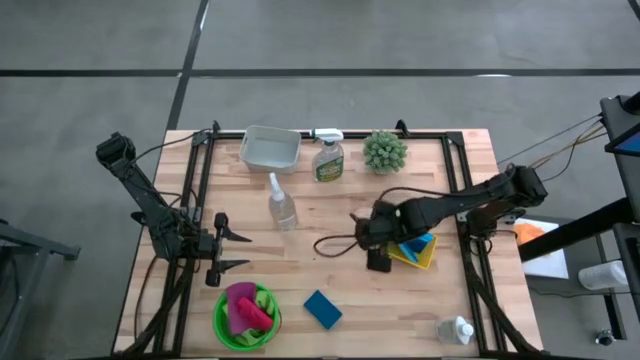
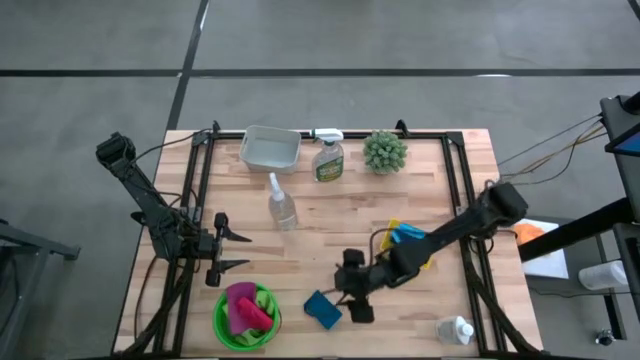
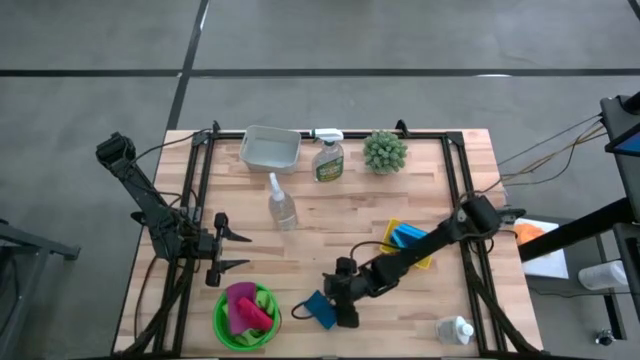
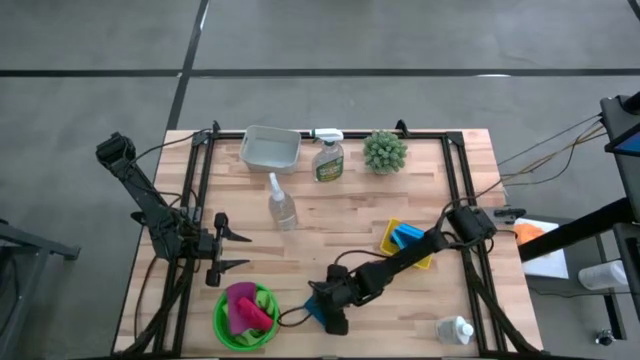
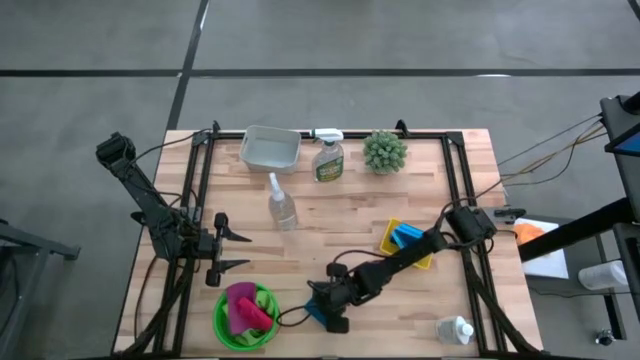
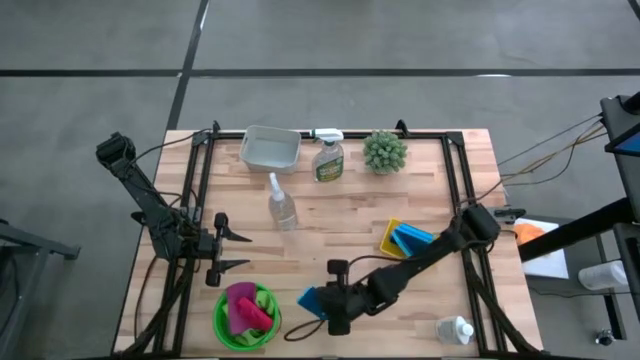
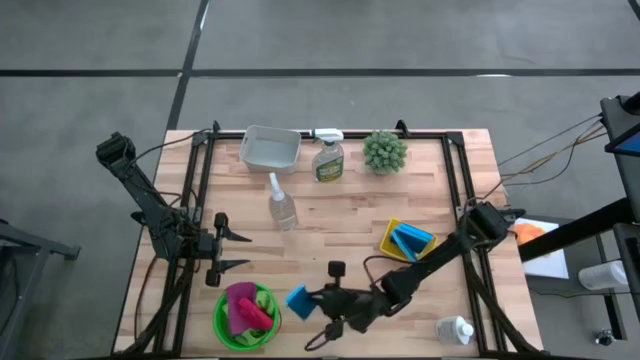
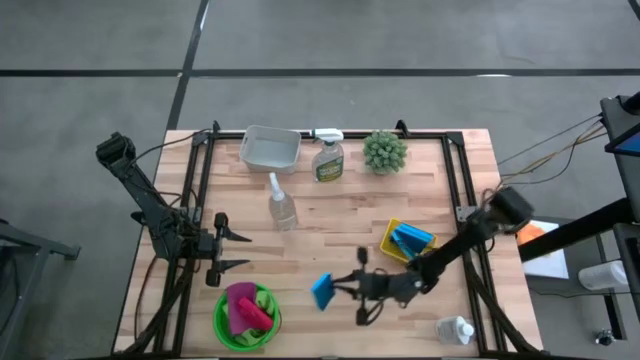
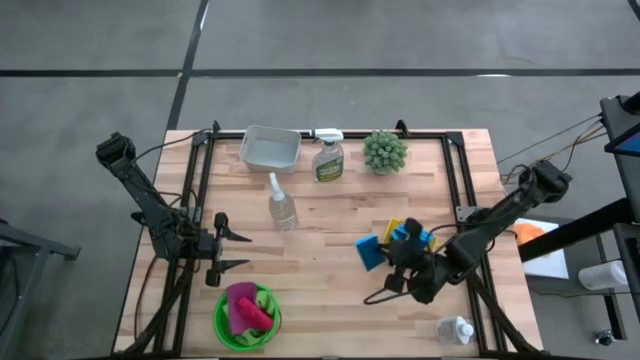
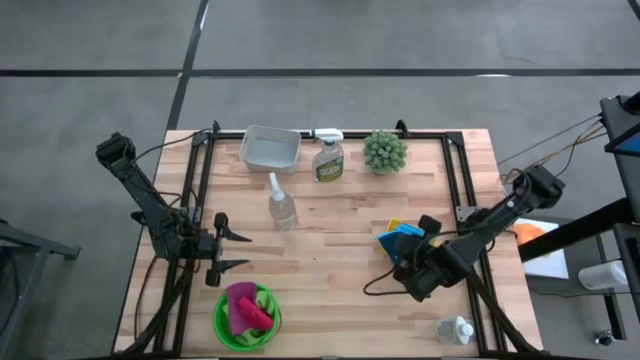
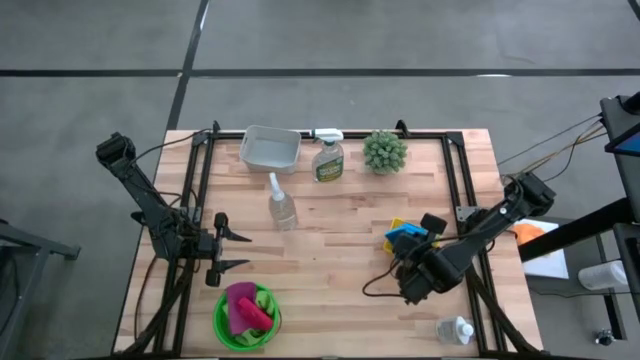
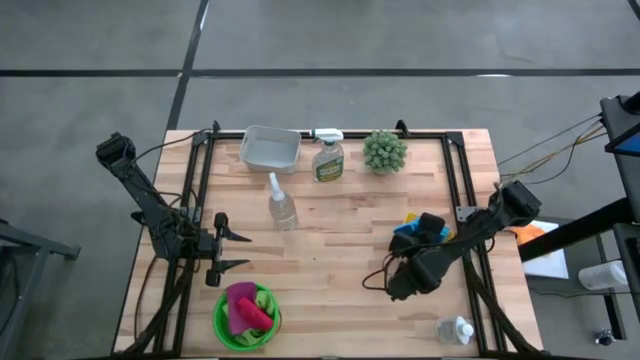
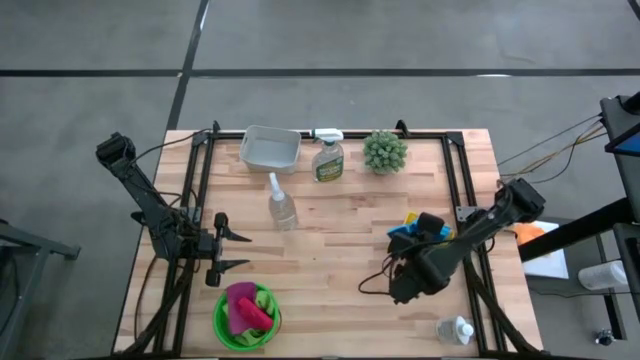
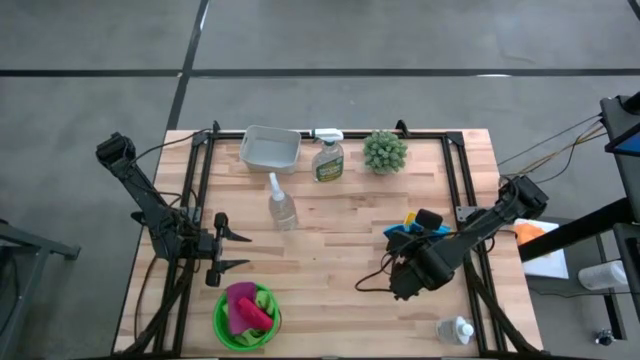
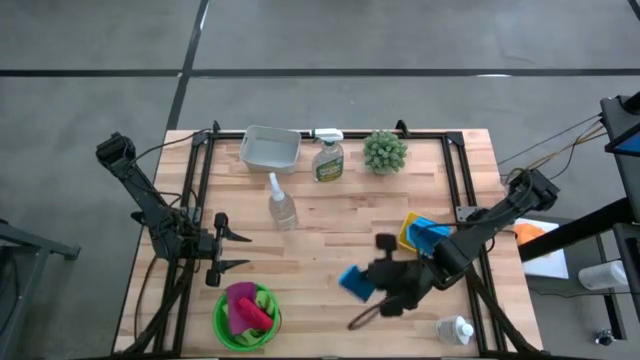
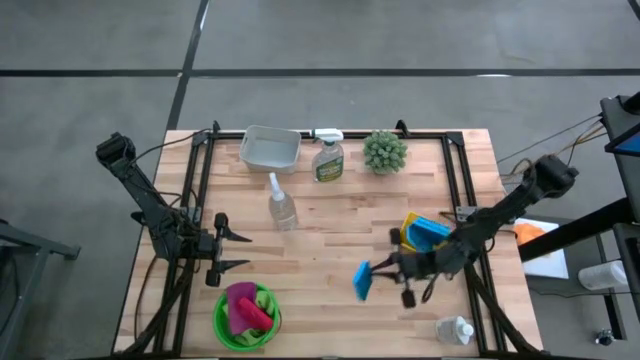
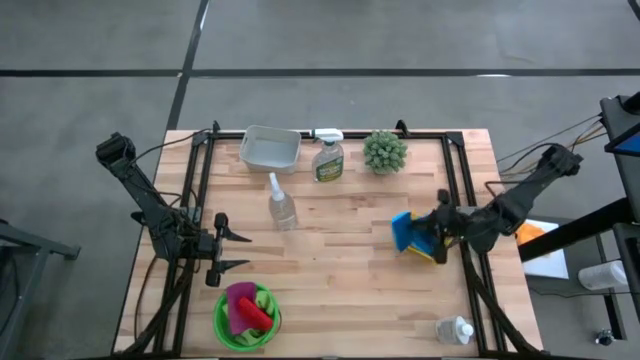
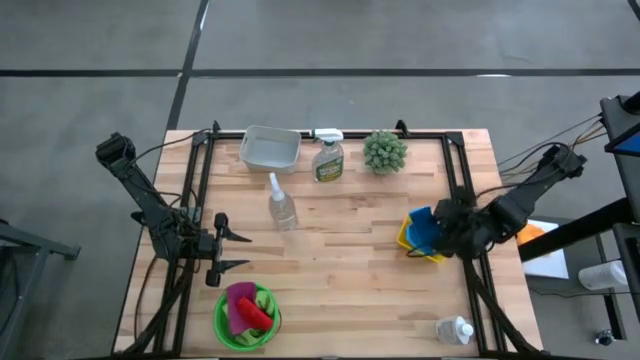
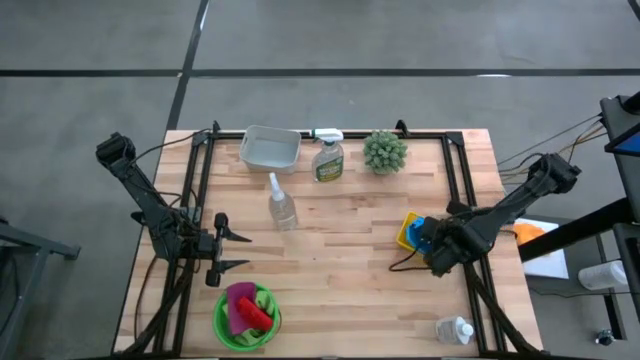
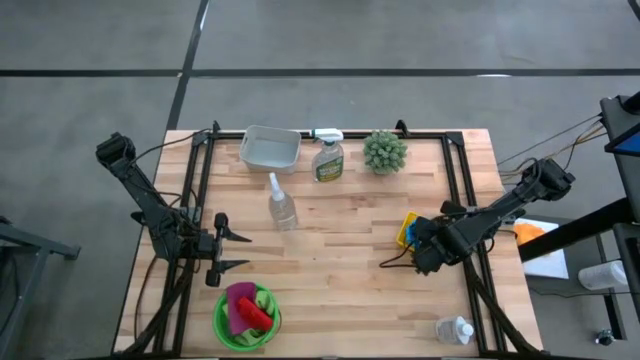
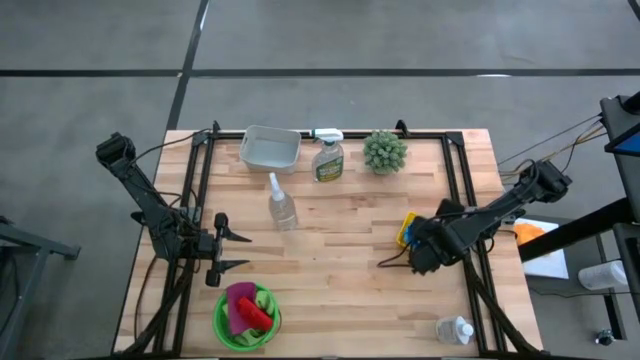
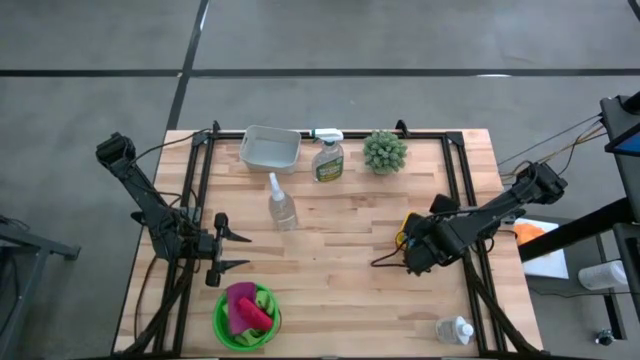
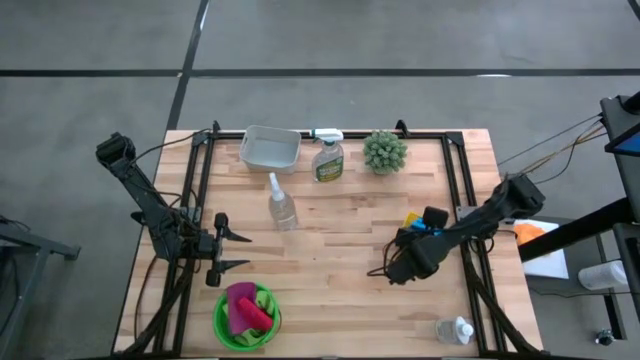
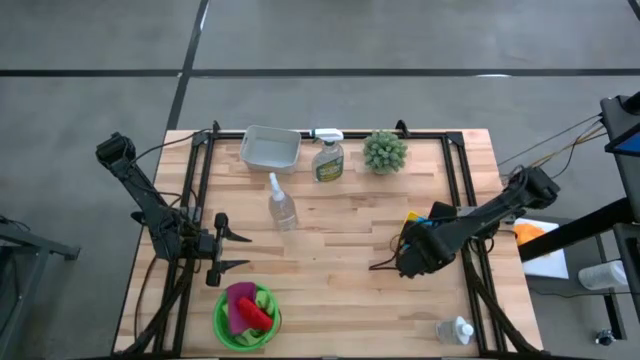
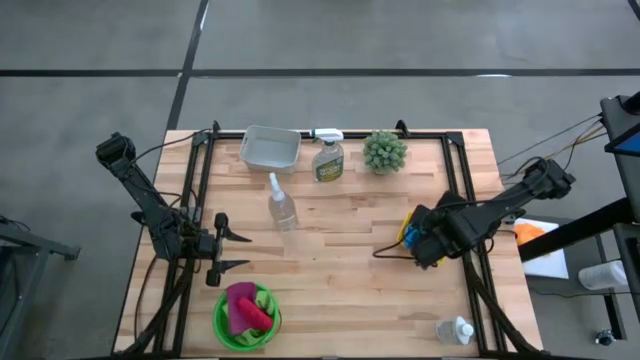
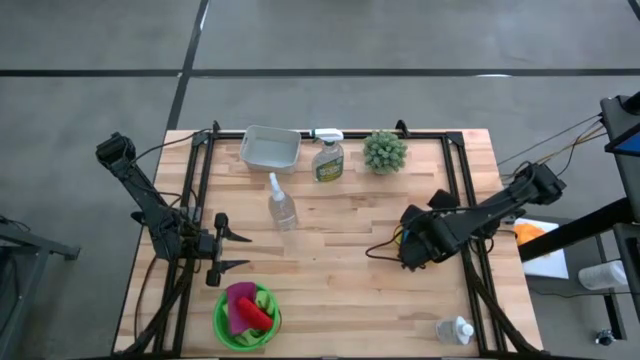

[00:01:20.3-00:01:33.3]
Task: Pick & Place Kitchen Items
Put the blue sponge into the yellow bin

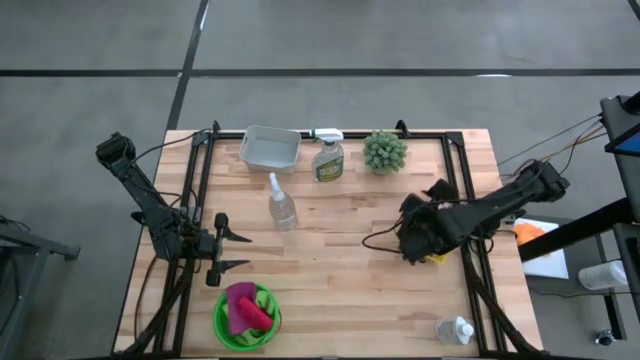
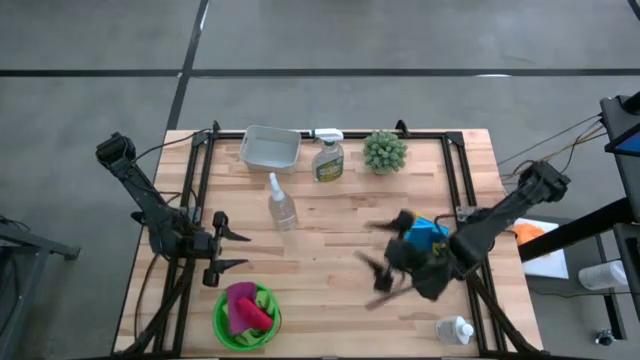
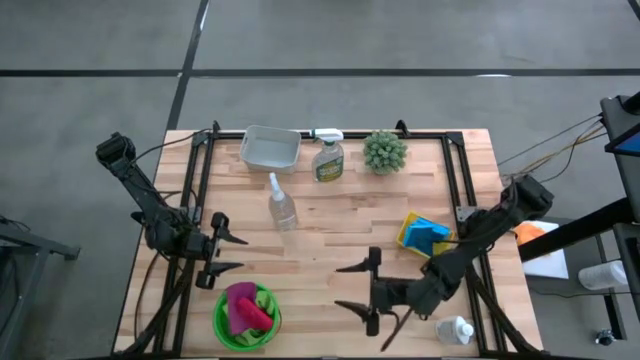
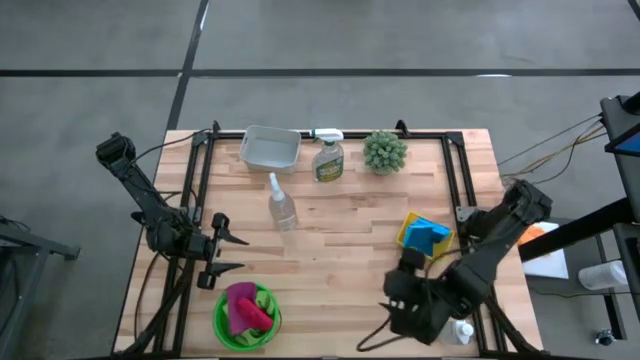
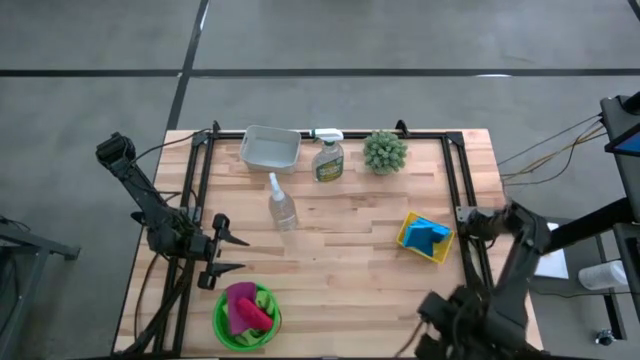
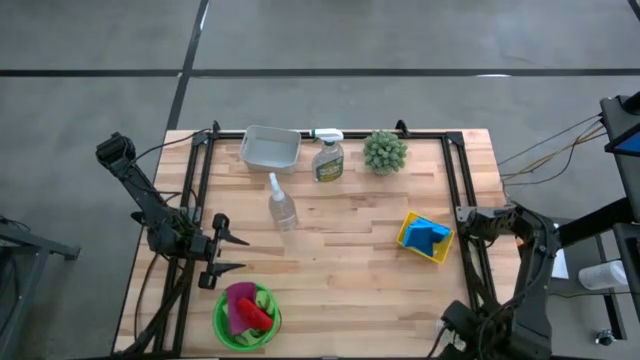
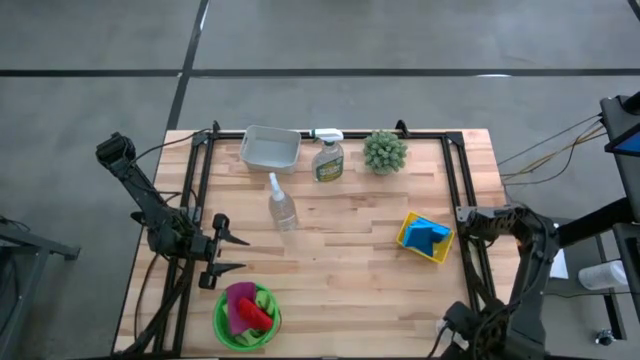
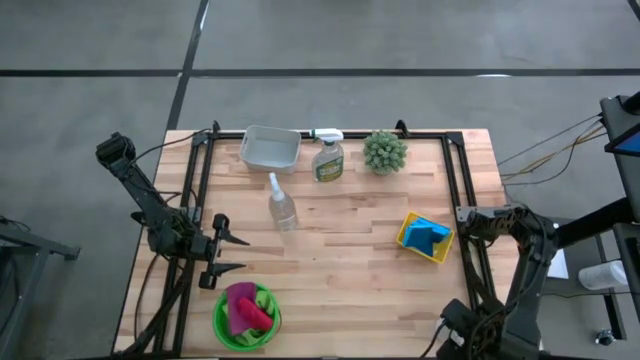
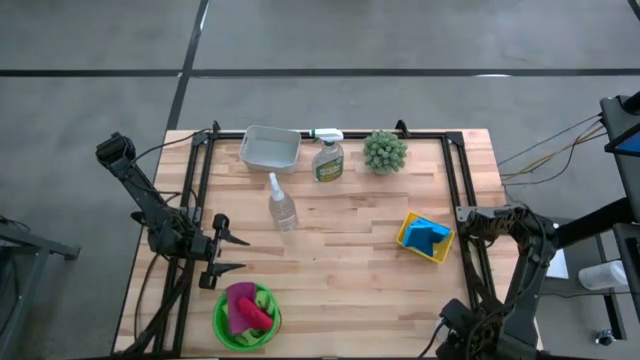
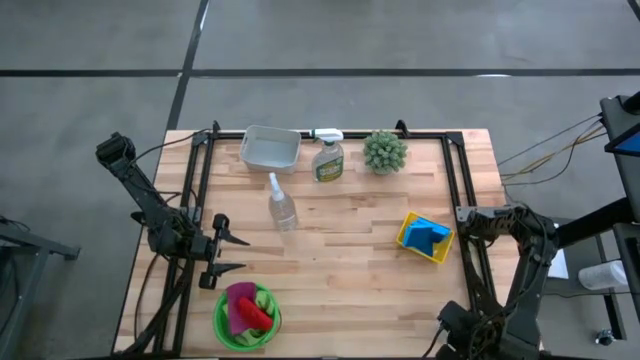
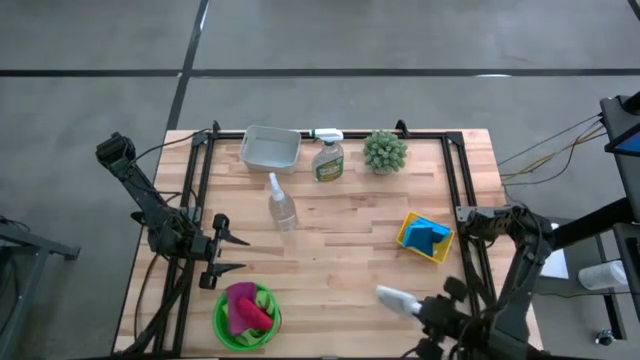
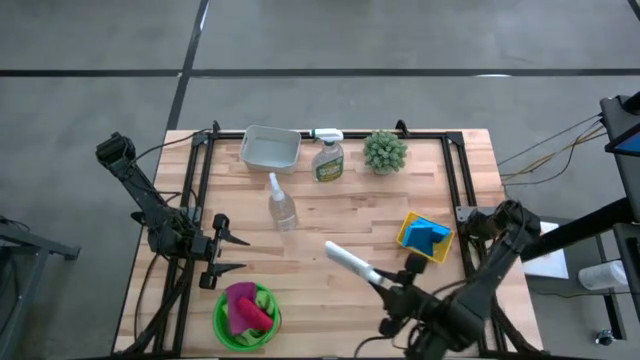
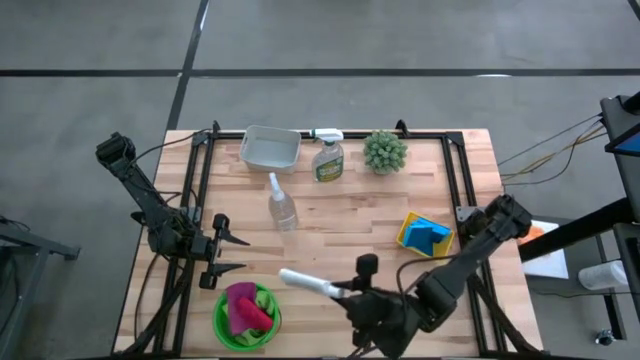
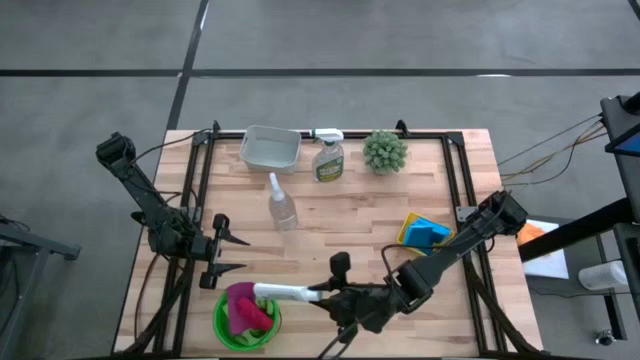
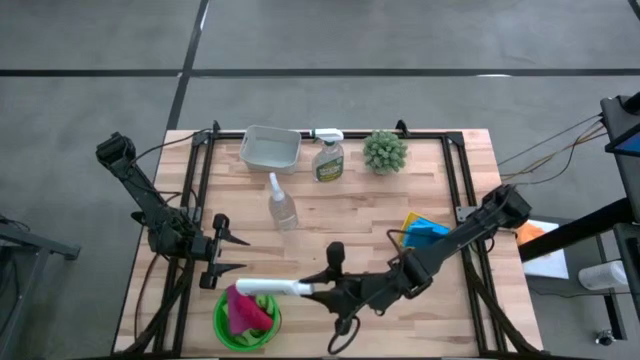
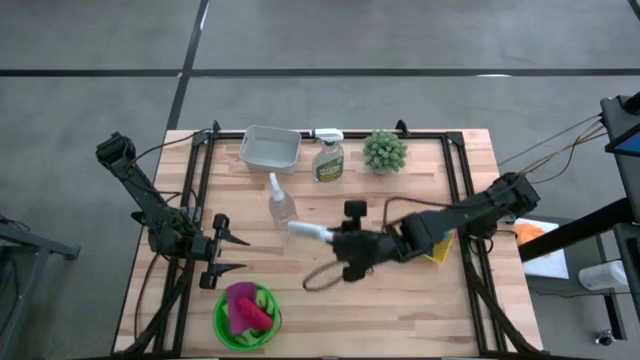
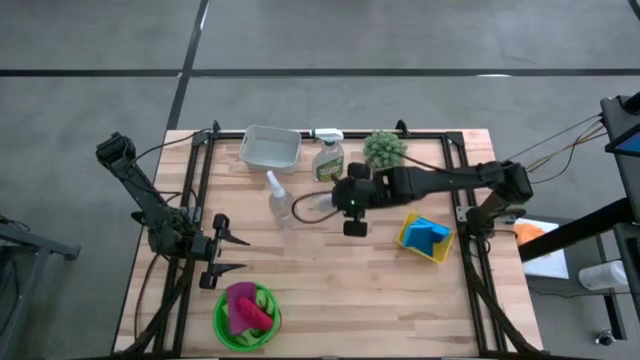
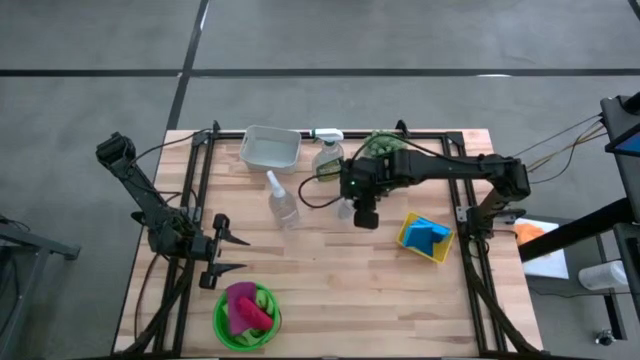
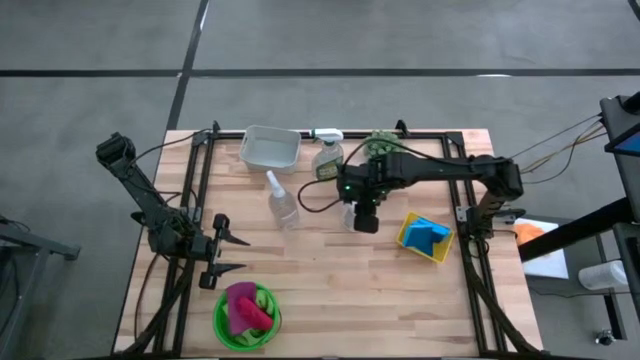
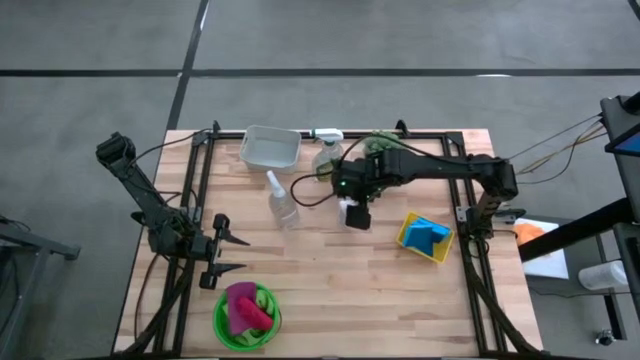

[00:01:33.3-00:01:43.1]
Move the white cleaner bottle in the middle of the table
